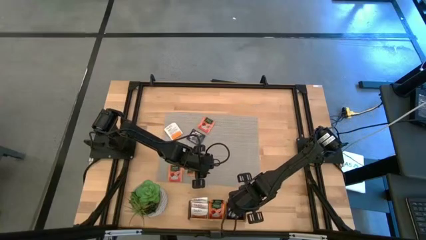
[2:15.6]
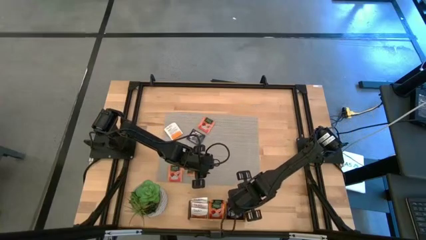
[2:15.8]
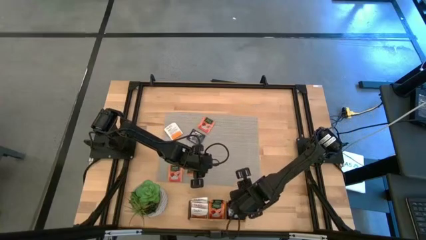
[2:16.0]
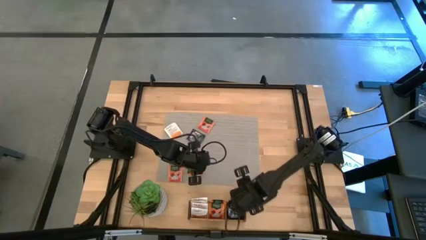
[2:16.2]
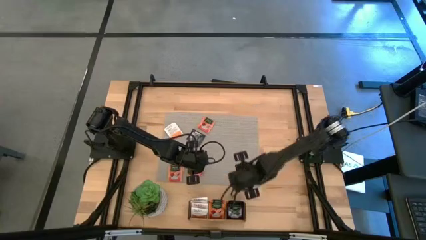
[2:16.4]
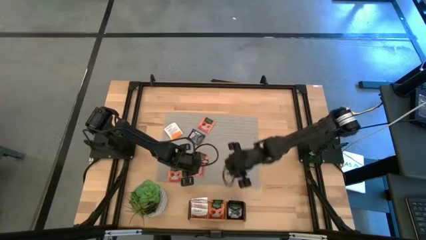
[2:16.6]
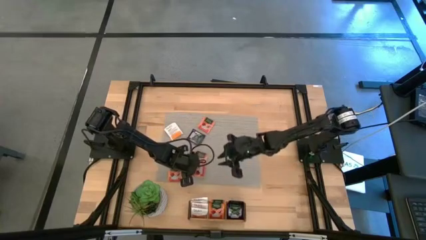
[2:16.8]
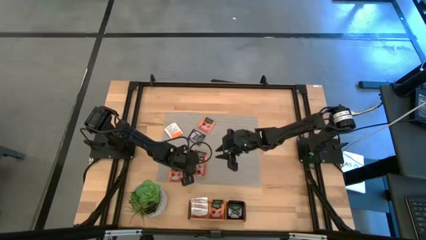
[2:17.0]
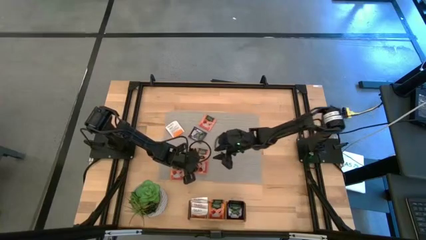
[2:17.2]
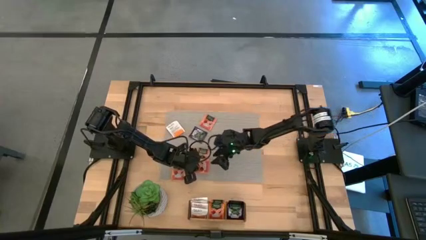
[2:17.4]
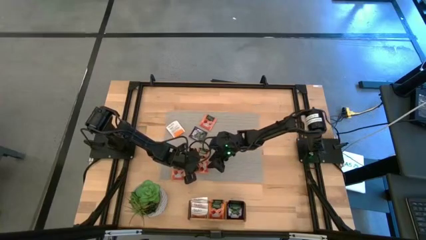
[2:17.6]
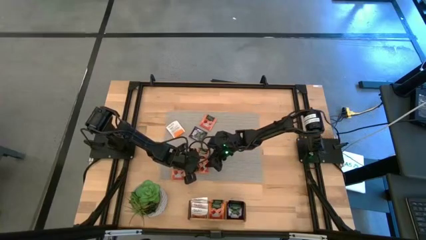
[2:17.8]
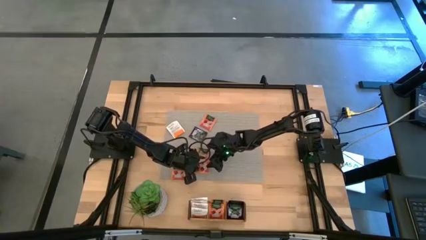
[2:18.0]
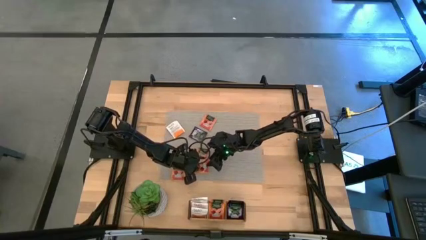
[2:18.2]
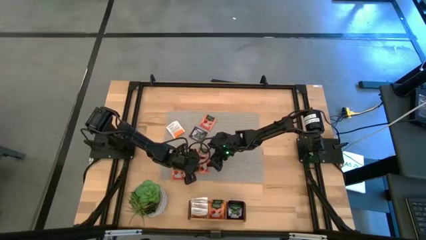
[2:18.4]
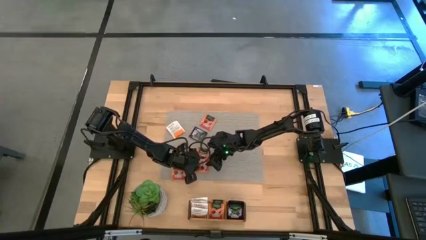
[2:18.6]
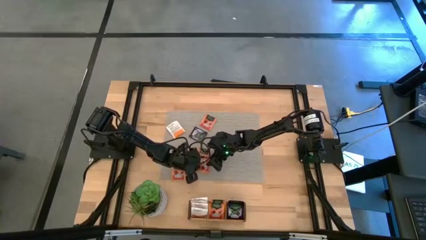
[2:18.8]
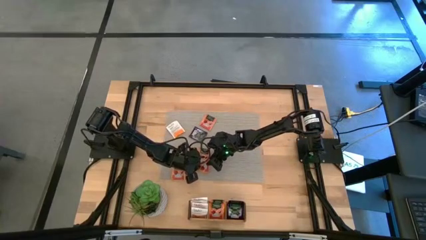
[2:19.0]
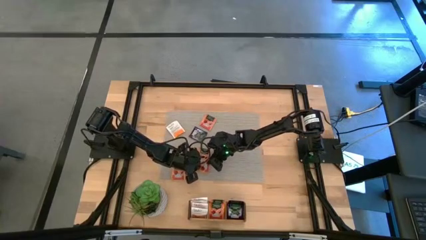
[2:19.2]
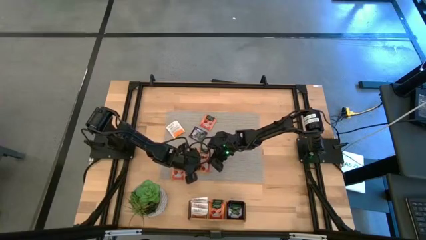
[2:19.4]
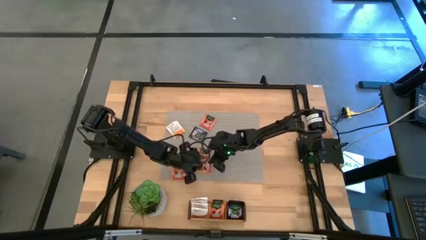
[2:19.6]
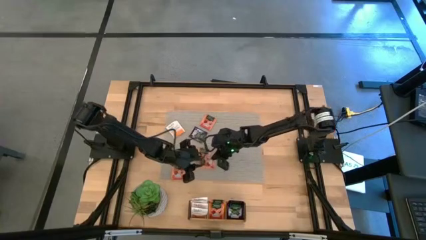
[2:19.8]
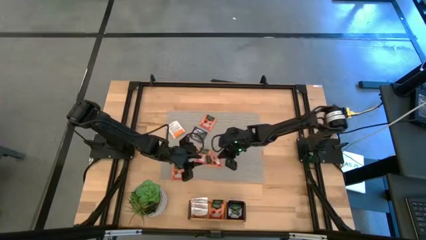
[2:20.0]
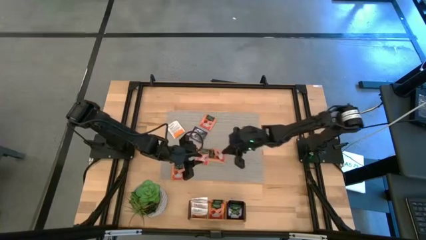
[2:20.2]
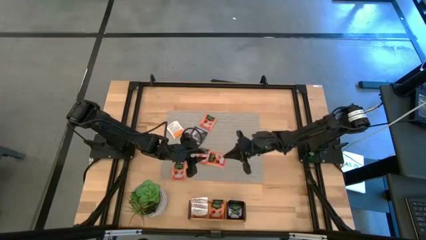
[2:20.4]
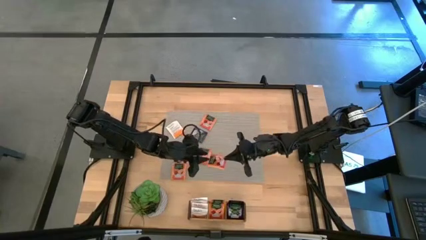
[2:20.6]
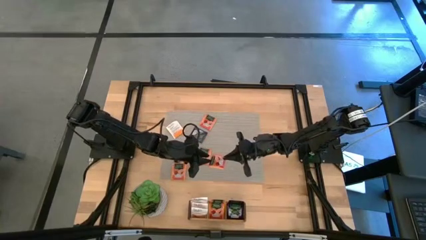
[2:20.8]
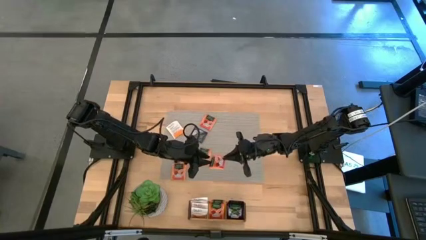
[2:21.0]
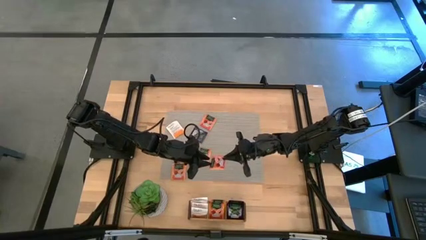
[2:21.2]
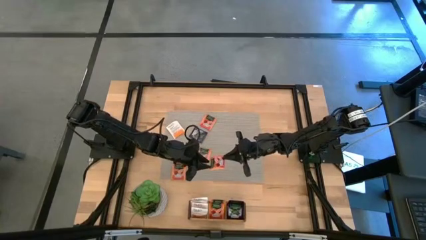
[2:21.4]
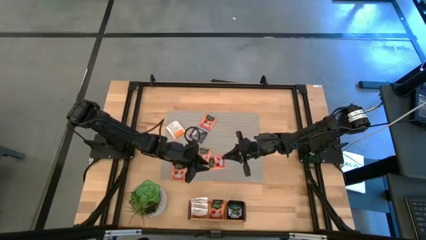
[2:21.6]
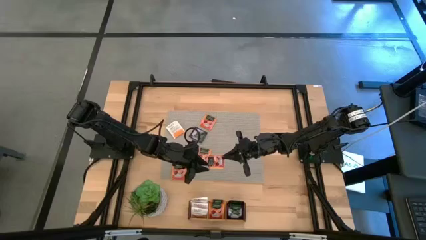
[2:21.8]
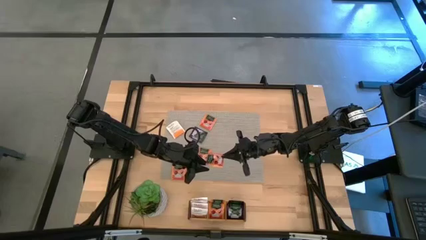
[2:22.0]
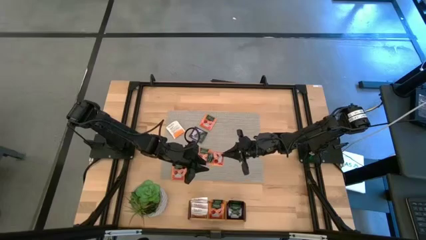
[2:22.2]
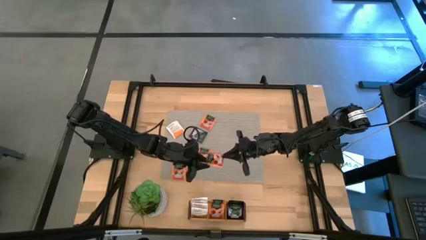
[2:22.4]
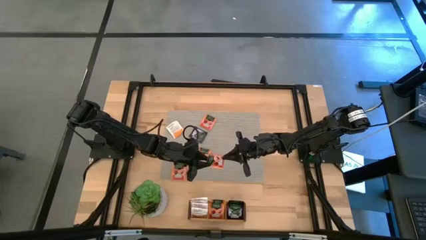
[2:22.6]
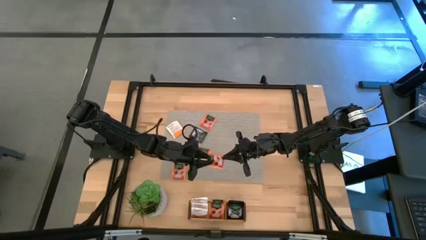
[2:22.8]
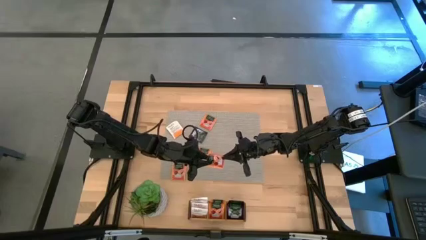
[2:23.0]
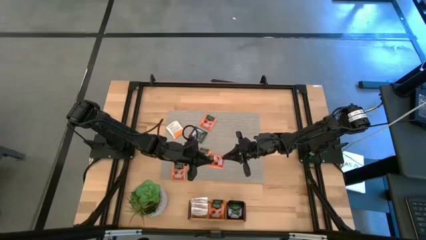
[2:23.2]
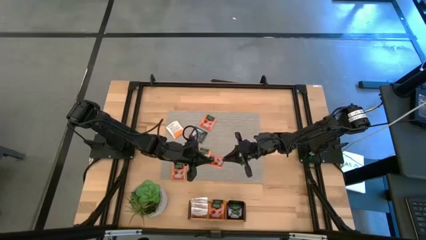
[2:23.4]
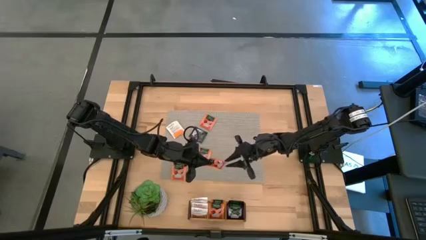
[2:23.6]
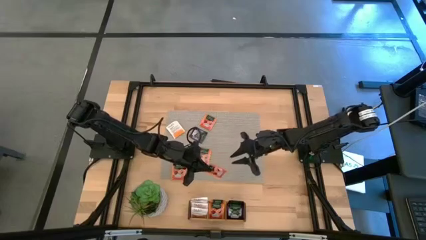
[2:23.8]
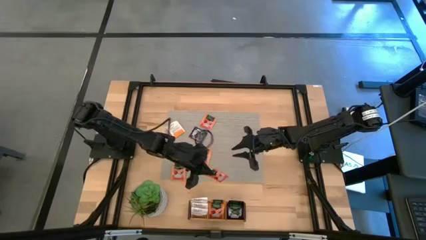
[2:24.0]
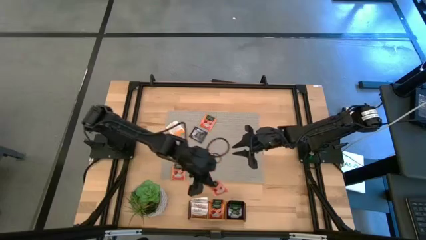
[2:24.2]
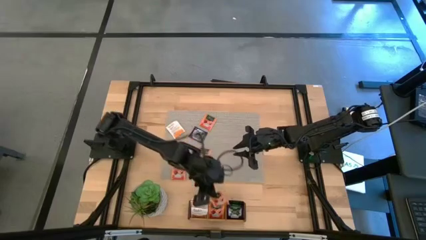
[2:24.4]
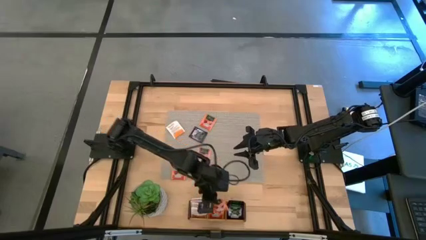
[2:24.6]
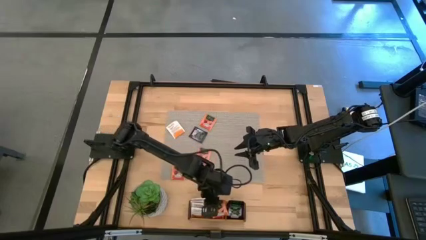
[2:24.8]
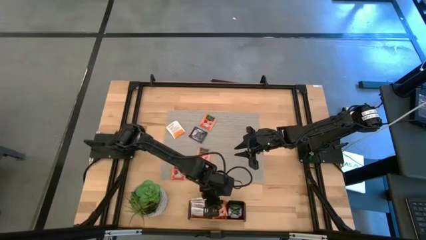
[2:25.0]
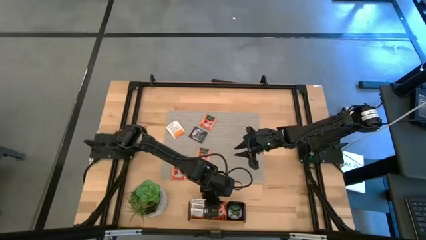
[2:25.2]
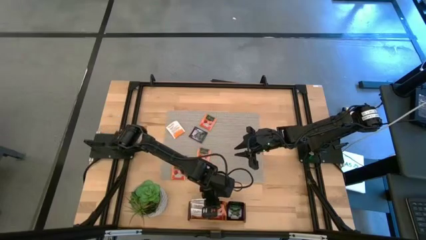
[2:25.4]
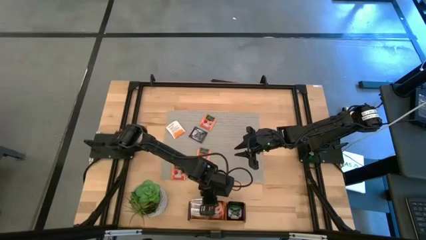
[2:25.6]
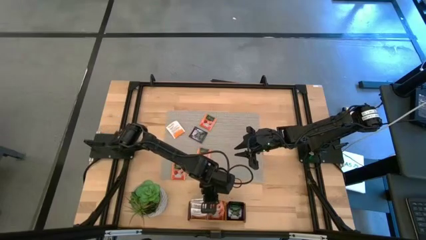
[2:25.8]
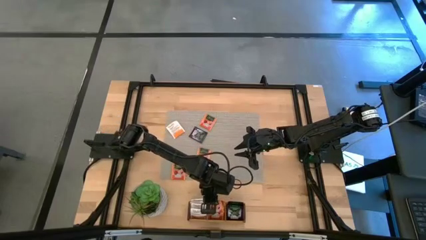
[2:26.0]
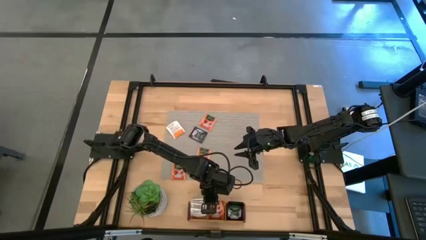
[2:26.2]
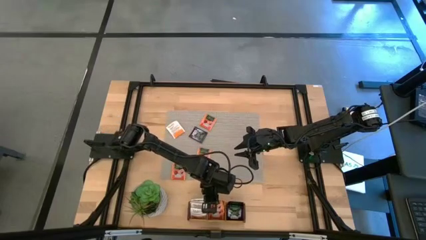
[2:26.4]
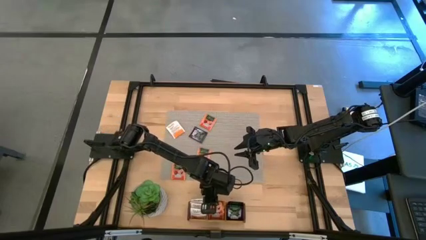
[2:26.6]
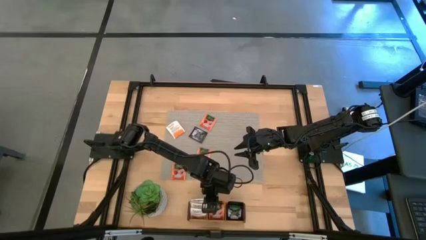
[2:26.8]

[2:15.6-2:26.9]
Task: Pick & Place Tea
Put the orange tea bag into the middle section of the wooden organizer

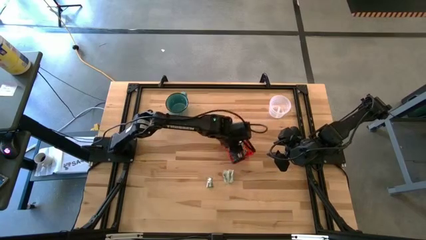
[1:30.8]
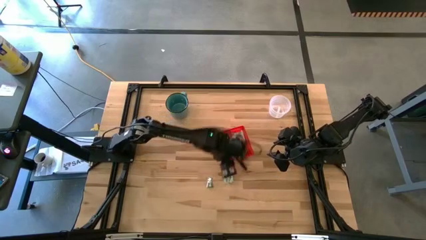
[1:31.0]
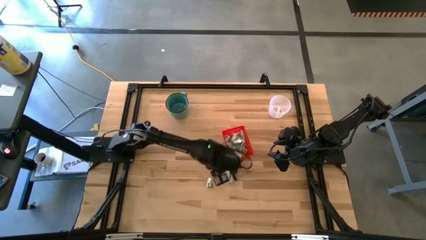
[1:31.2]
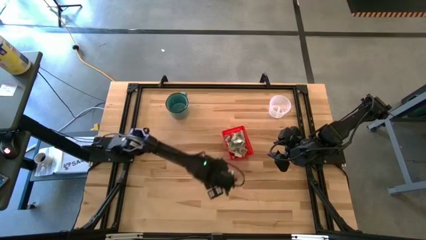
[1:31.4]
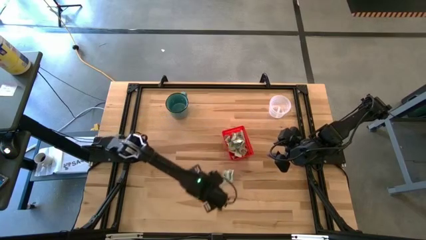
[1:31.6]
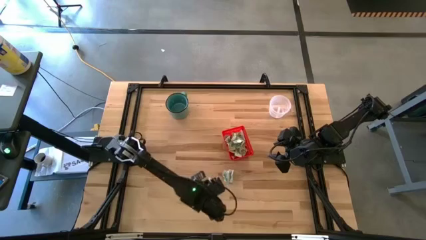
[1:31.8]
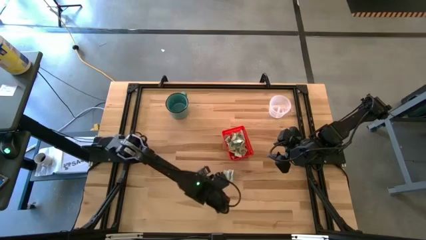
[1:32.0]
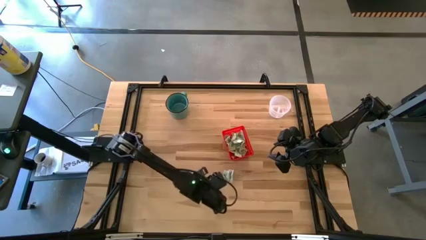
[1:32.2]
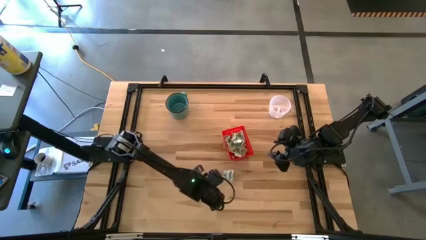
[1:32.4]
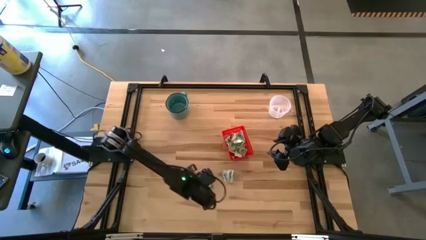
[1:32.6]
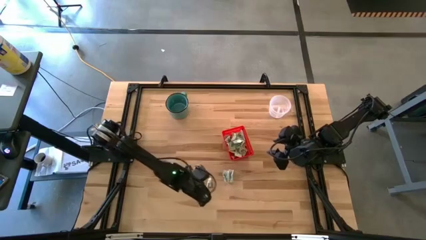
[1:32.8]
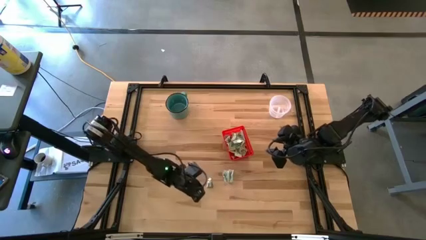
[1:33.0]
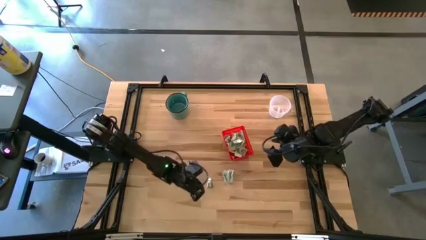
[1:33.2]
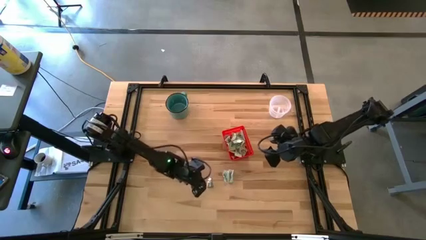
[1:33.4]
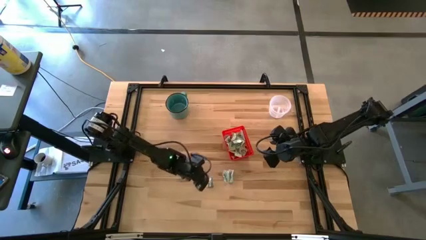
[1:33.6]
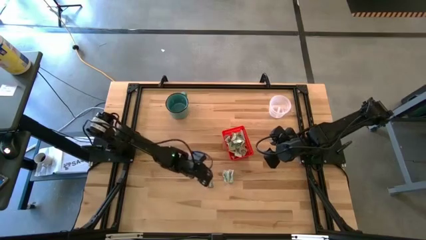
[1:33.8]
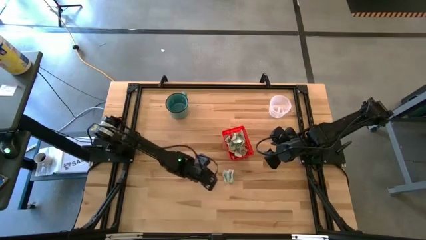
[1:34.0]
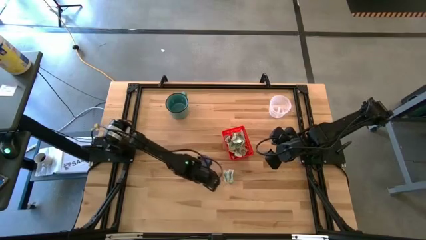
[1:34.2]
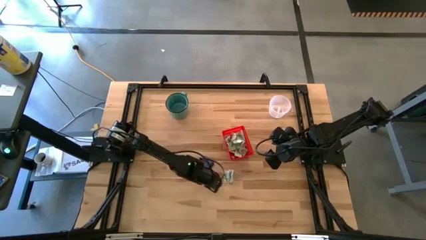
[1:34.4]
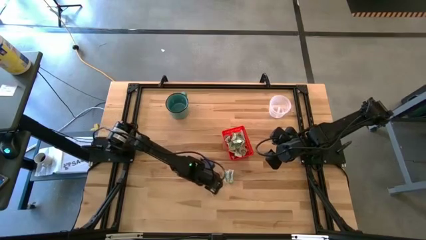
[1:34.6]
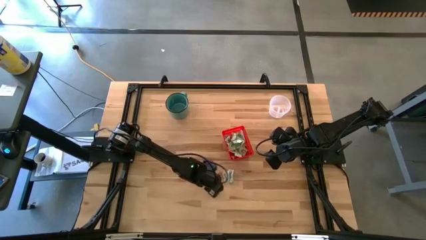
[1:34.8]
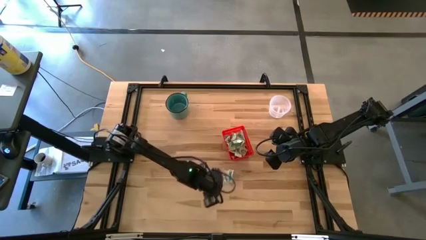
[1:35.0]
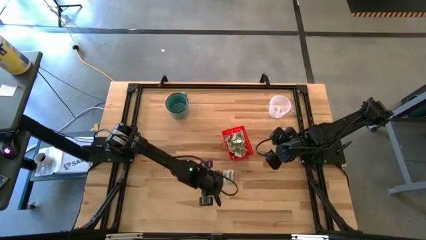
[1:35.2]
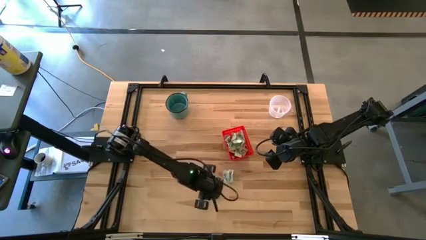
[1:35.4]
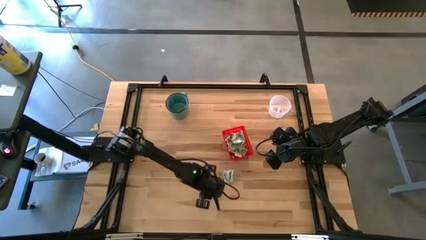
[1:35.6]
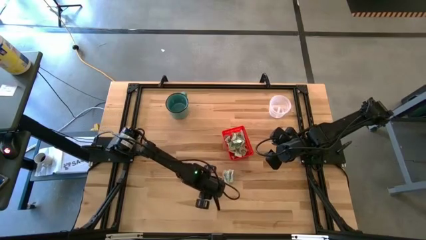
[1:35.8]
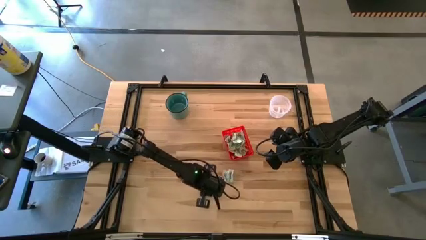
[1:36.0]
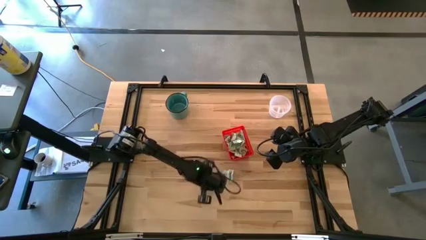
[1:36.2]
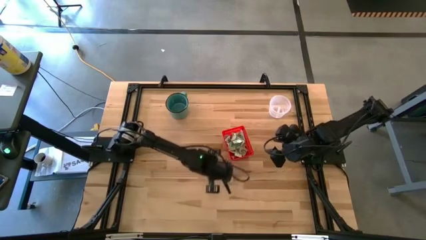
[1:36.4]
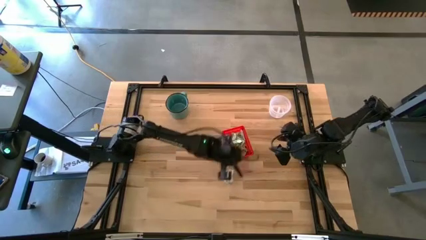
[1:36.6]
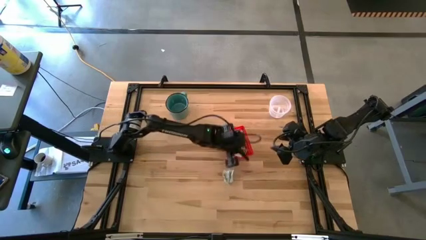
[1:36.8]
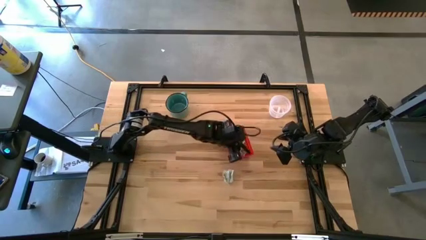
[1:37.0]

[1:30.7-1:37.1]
Task: Pick and place items into bin
Put the truvia packet into the orange bin
